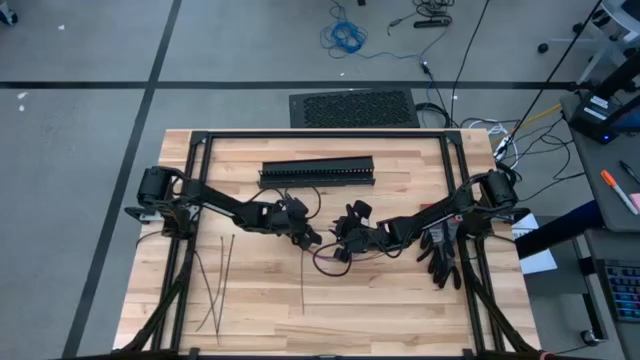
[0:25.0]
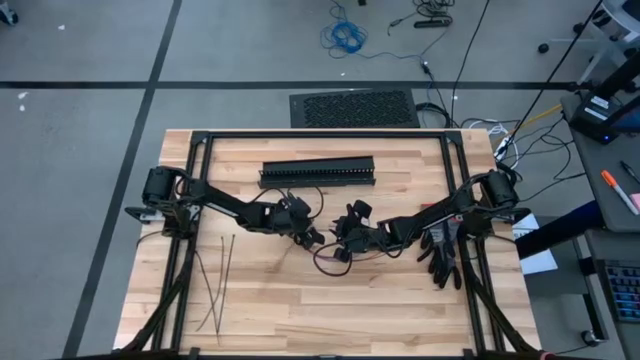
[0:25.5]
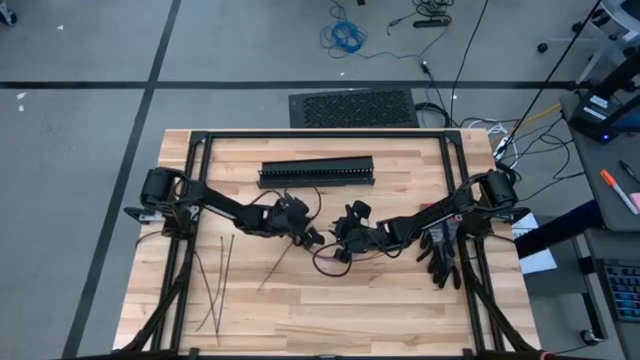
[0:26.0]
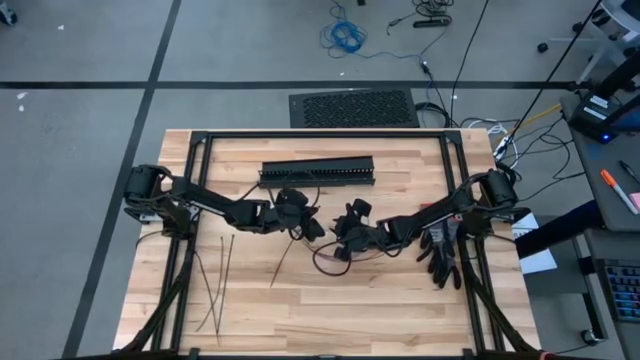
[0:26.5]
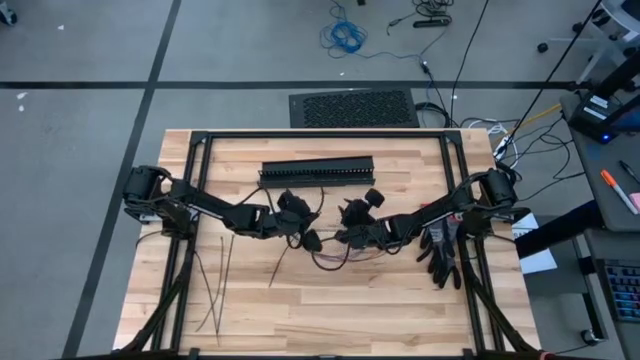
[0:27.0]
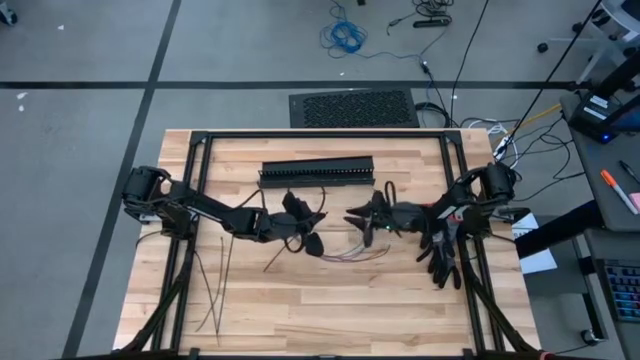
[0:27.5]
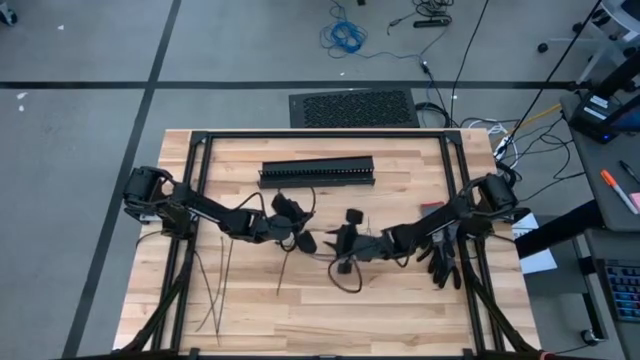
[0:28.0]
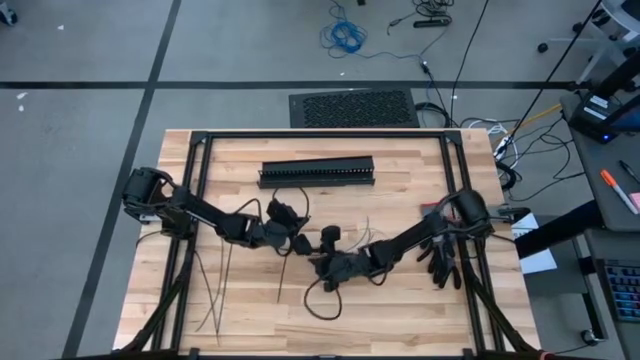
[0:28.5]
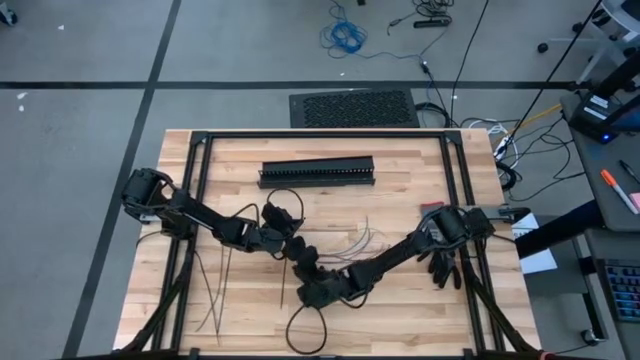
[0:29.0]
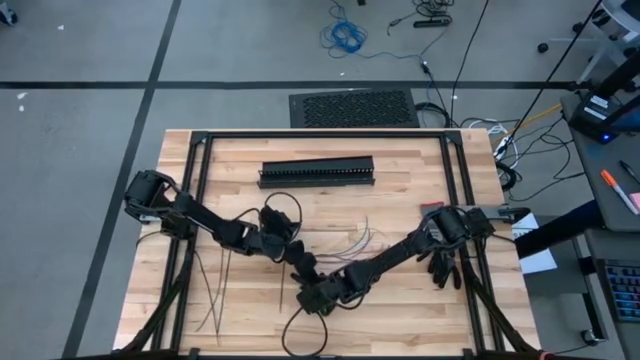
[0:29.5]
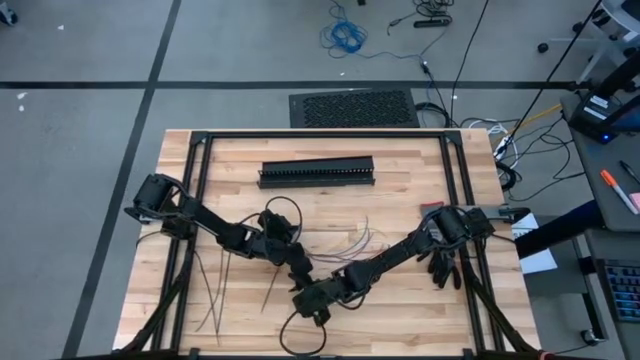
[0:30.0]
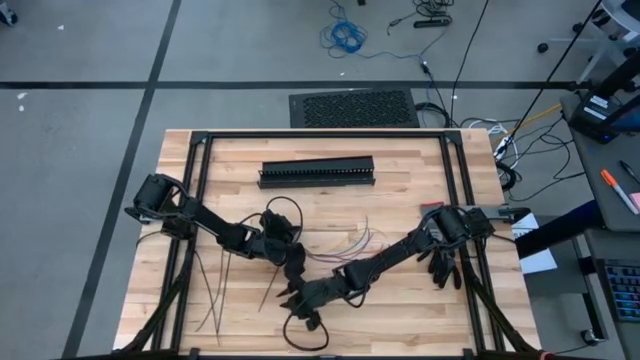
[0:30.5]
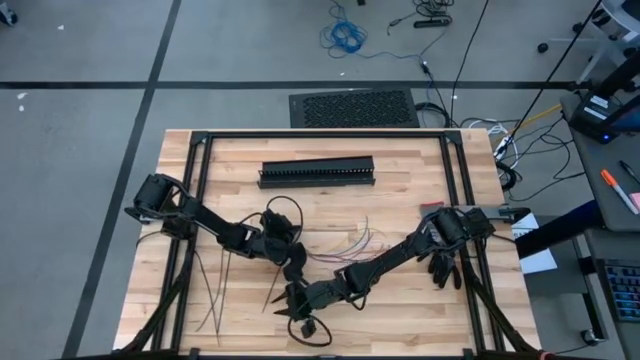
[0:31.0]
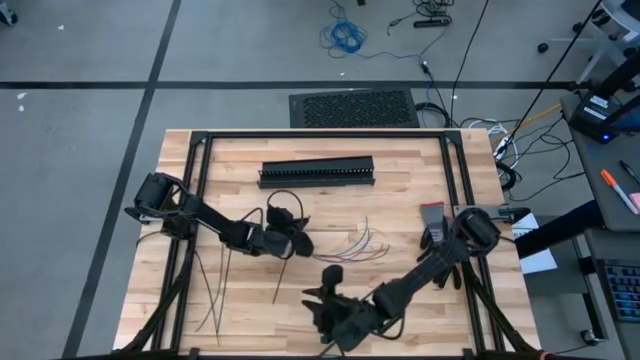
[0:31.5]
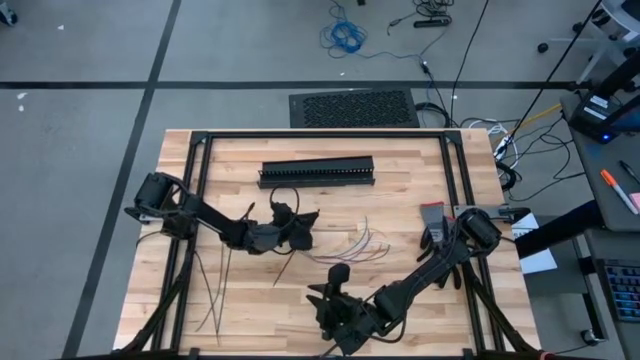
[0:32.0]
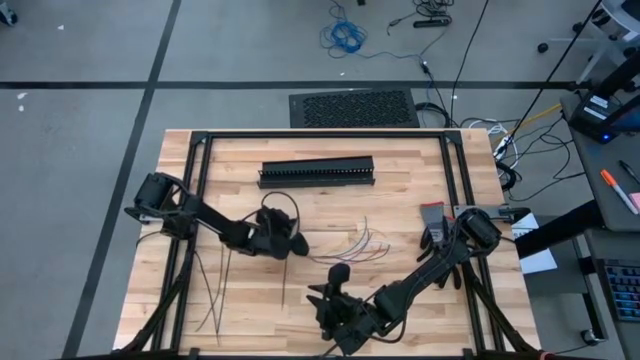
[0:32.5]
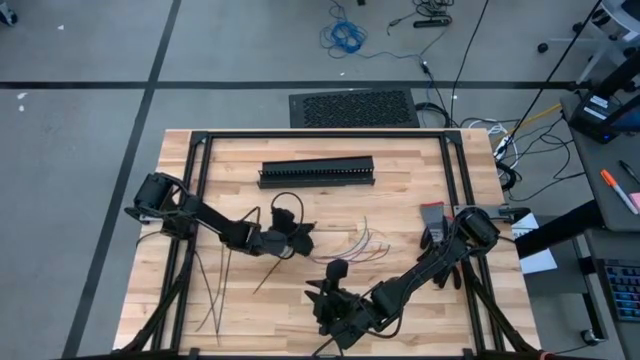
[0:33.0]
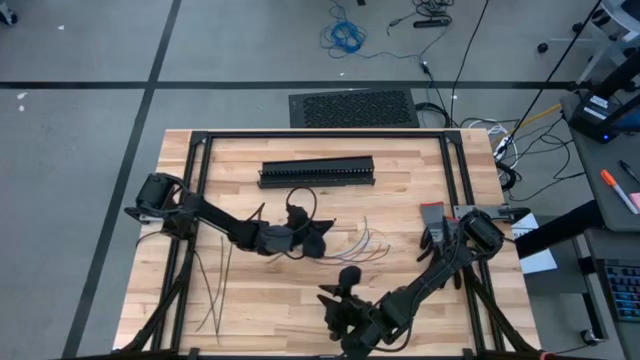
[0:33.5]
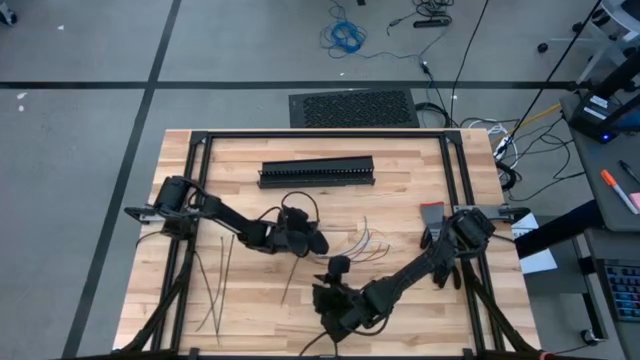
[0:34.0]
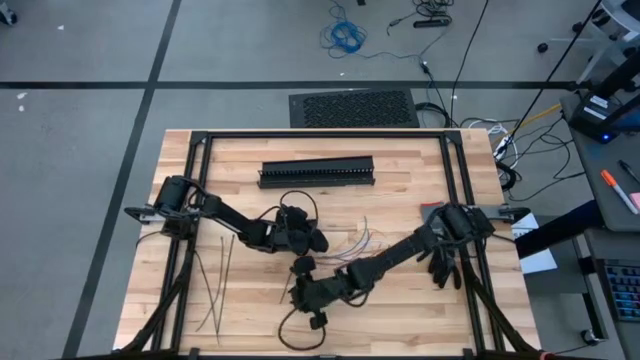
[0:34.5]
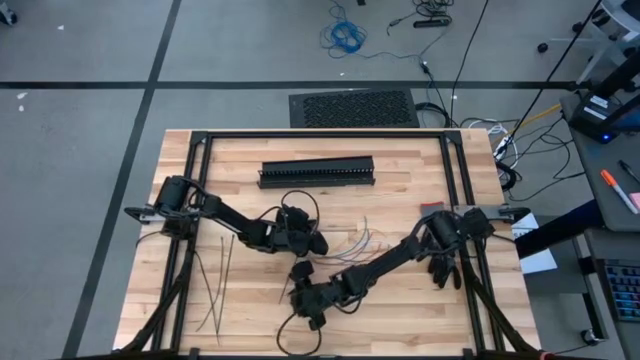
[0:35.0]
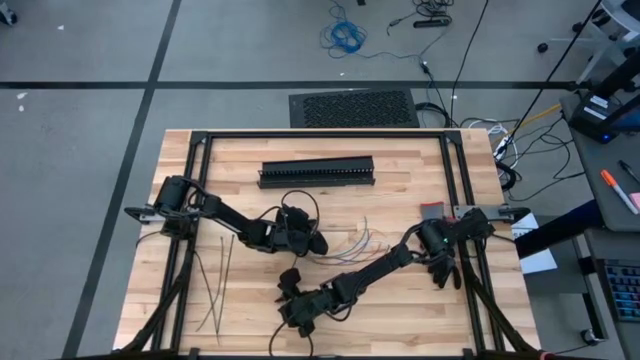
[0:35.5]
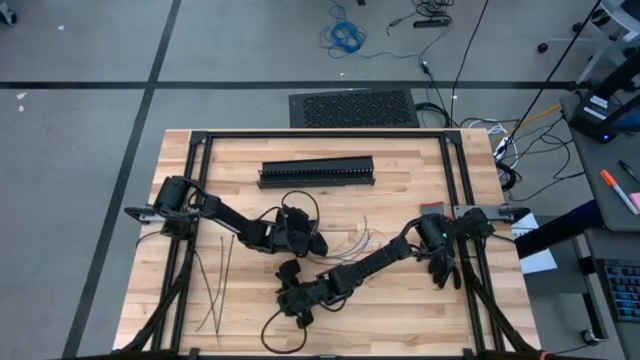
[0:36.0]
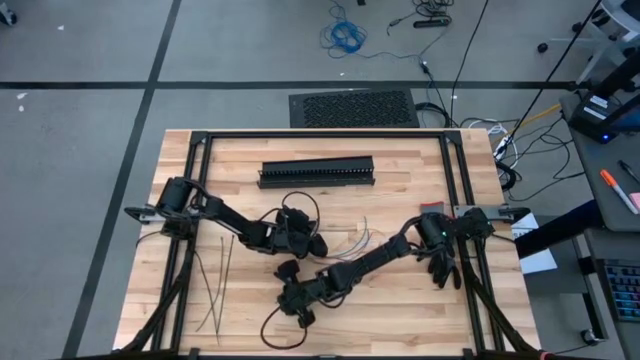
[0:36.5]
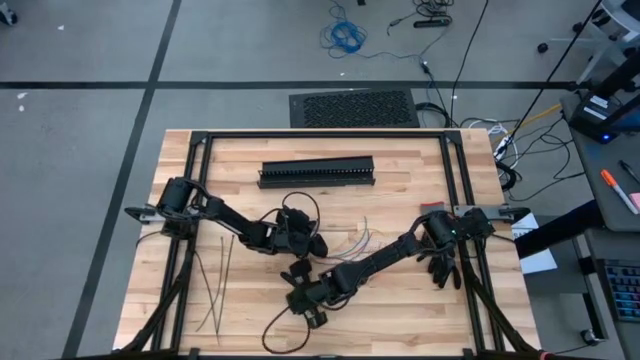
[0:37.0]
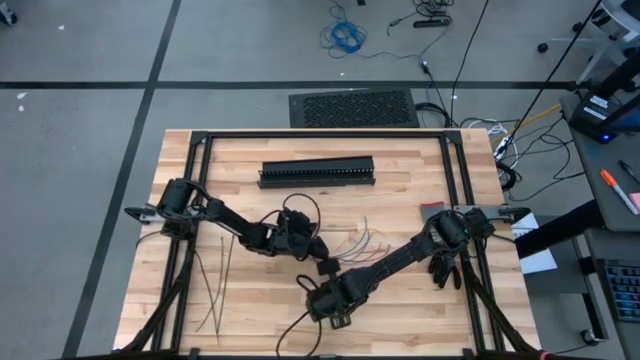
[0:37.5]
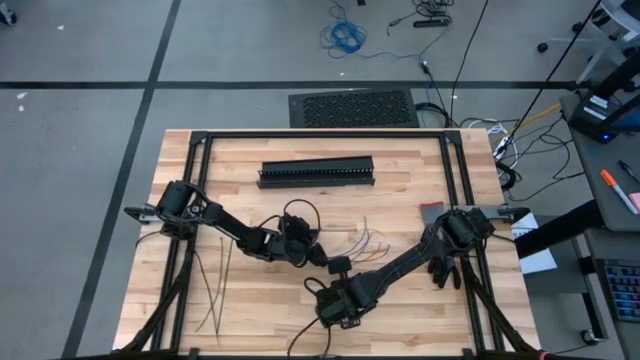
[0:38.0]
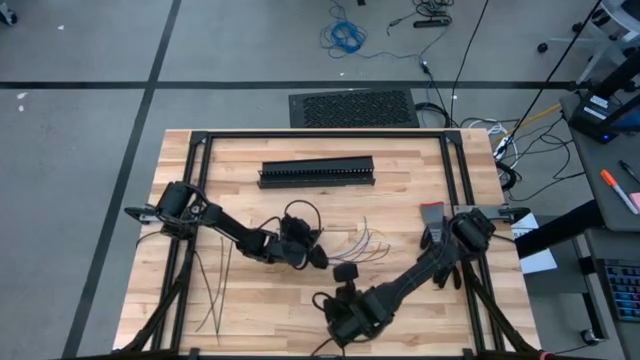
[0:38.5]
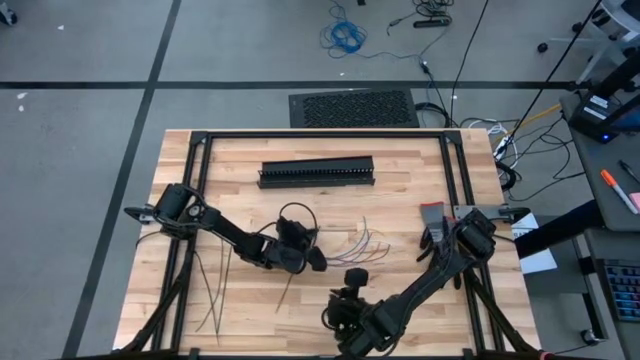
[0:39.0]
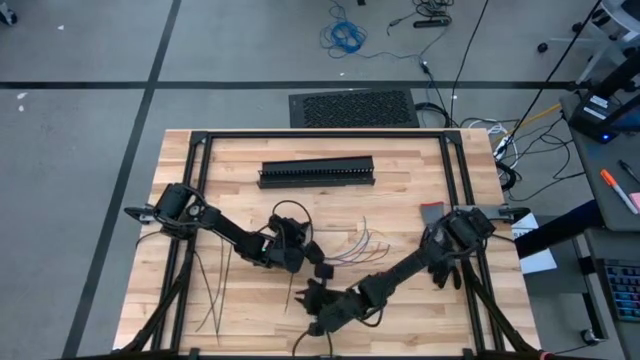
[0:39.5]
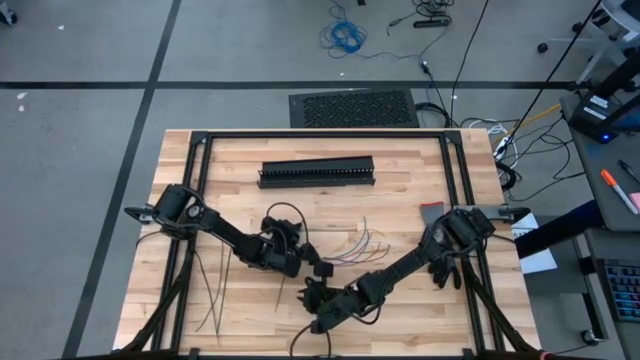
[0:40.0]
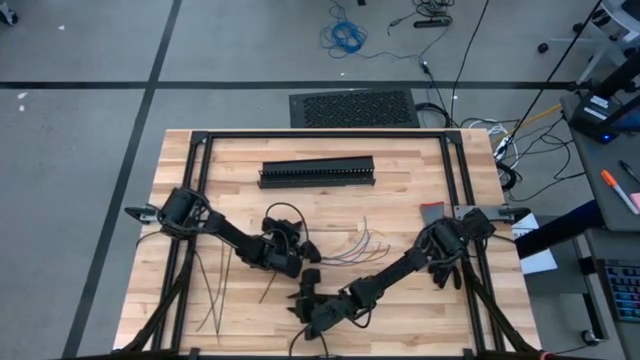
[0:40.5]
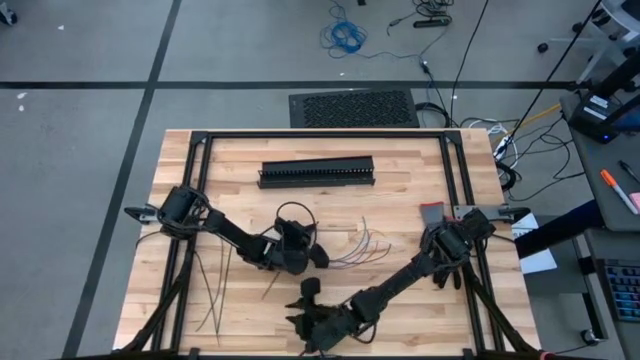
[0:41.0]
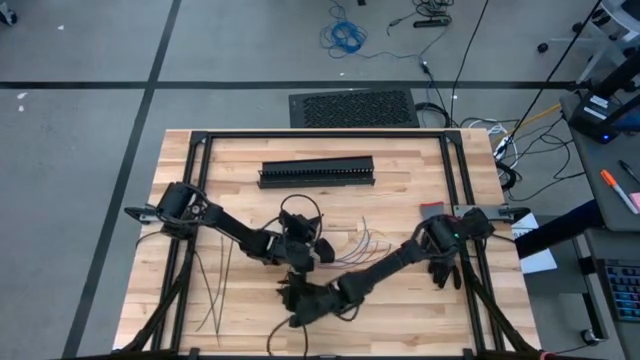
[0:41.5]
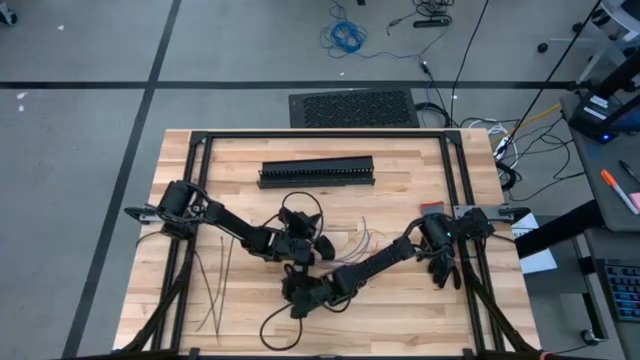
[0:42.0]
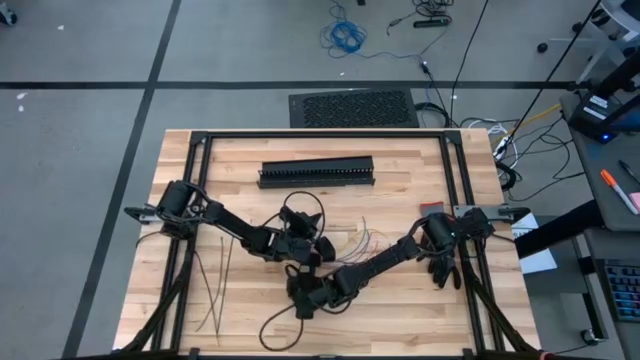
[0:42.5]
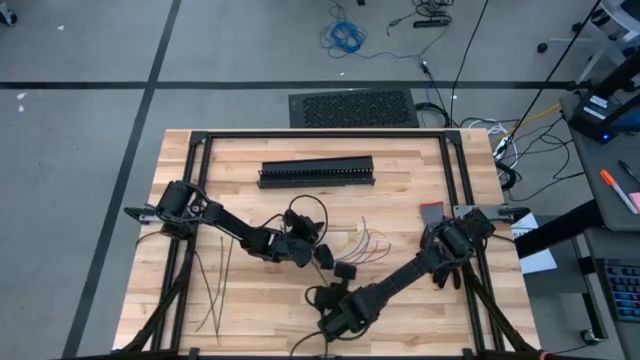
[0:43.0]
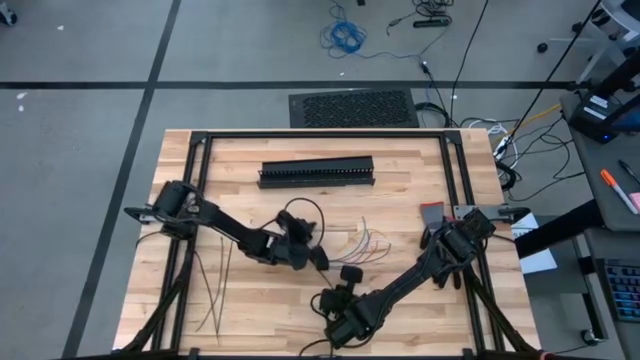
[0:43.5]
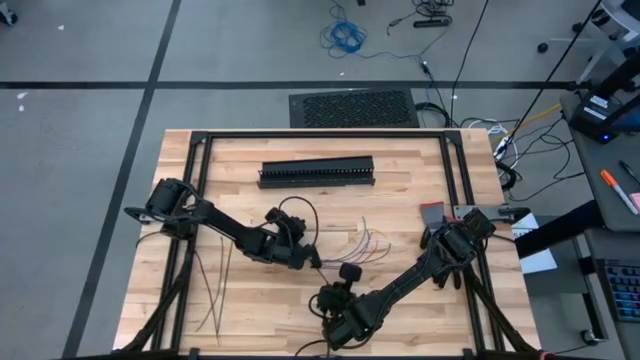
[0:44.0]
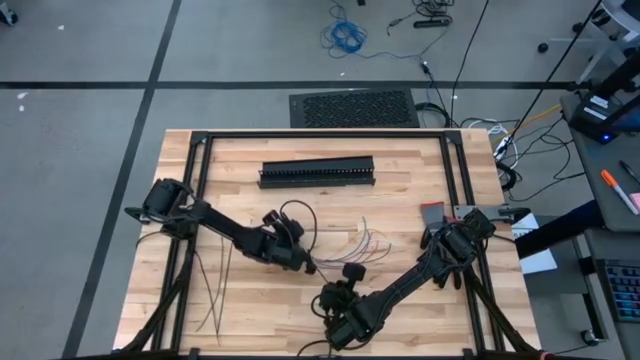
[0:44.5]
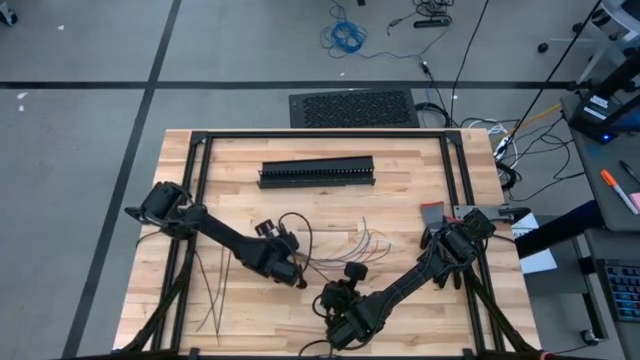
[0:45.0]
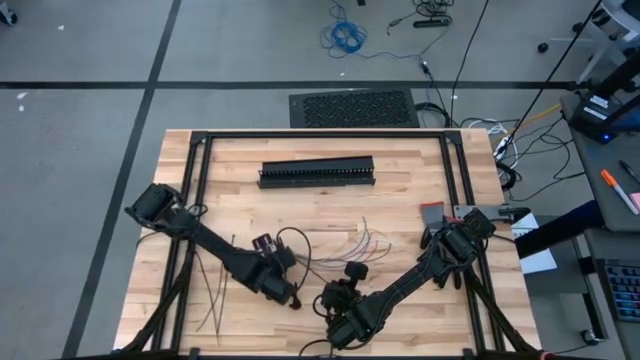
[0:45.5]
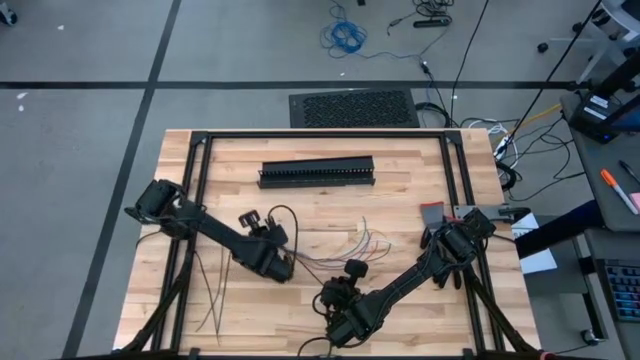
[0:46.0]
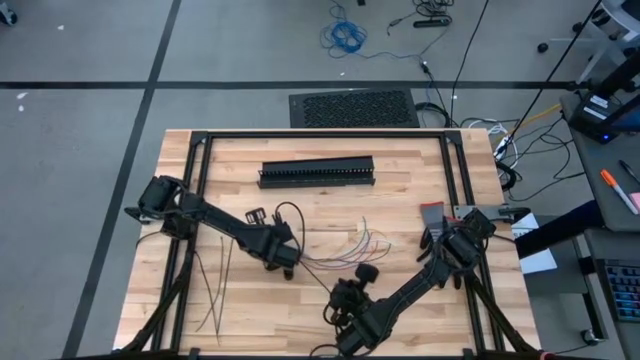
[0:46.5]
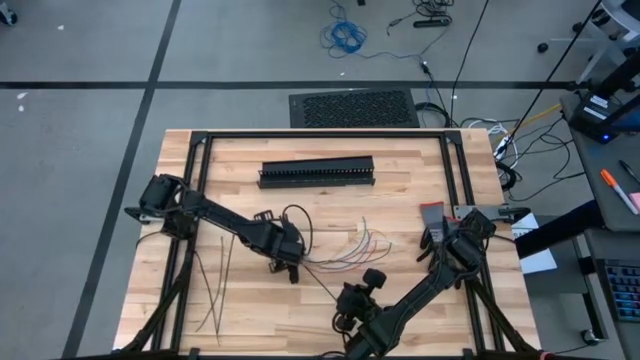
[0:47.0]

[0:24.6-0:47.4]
Task: Ziptie cables
Wrap the zip tie around the cable wires
